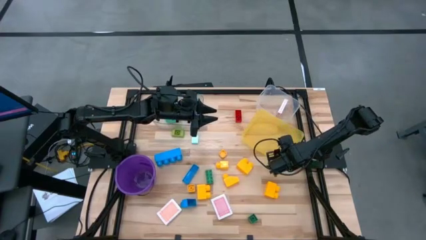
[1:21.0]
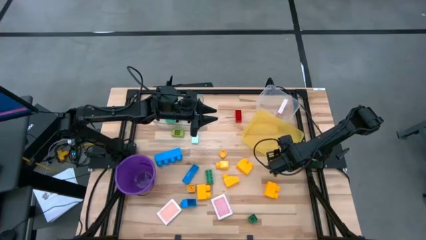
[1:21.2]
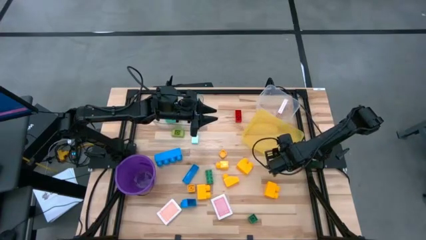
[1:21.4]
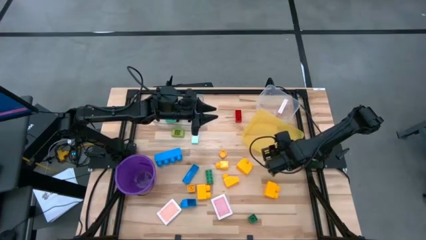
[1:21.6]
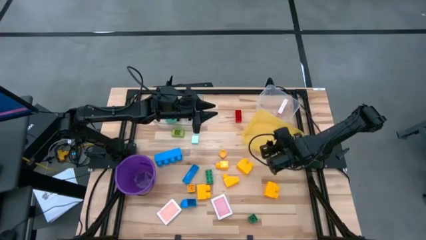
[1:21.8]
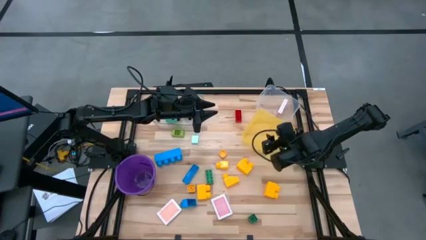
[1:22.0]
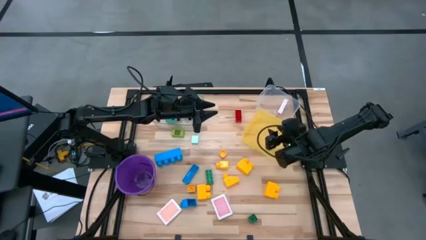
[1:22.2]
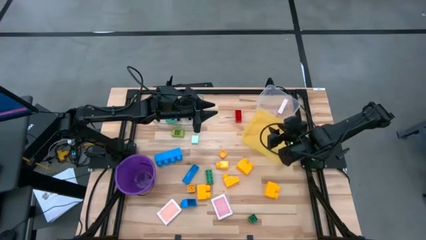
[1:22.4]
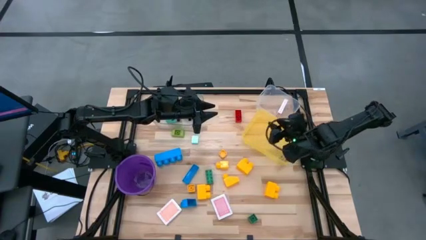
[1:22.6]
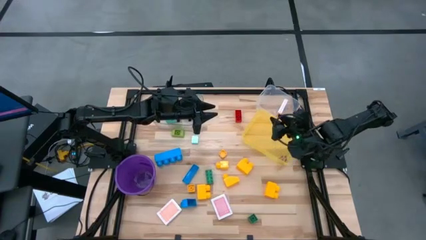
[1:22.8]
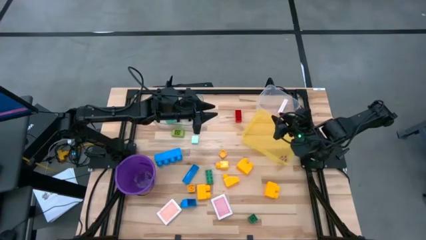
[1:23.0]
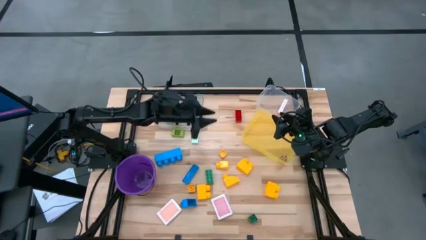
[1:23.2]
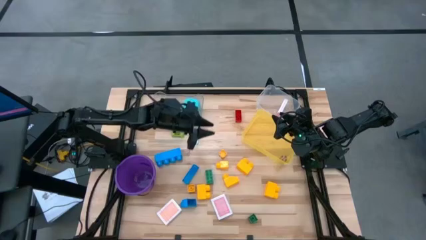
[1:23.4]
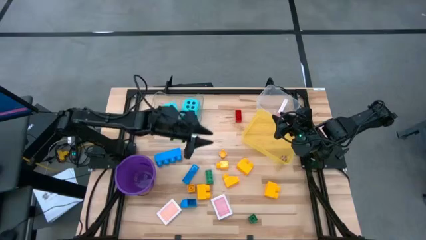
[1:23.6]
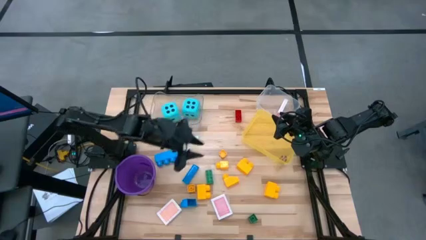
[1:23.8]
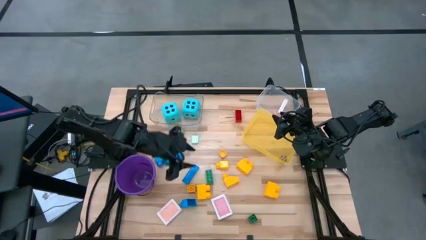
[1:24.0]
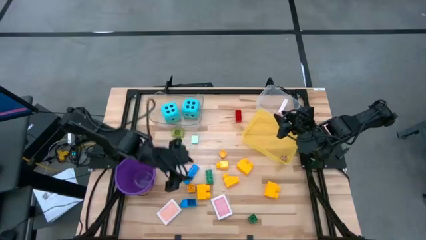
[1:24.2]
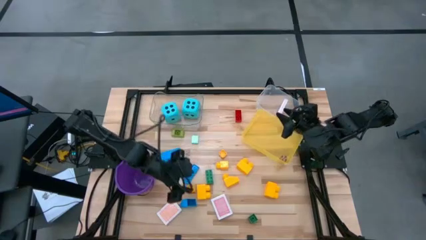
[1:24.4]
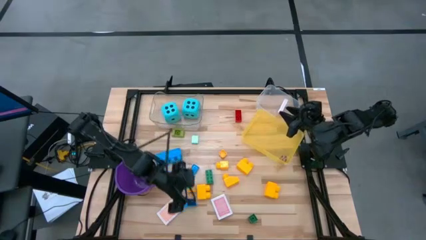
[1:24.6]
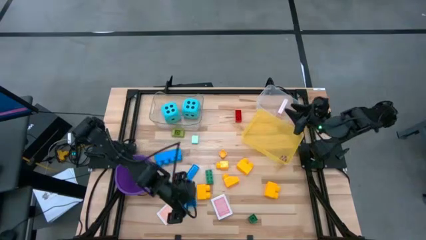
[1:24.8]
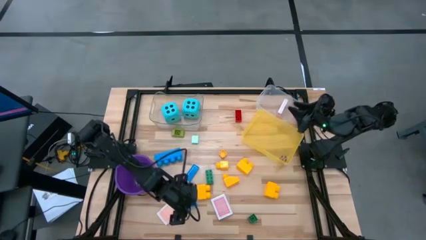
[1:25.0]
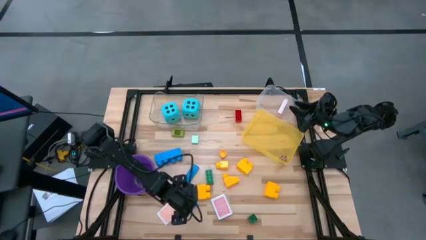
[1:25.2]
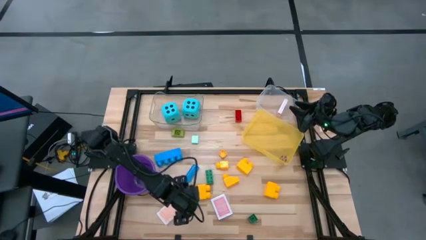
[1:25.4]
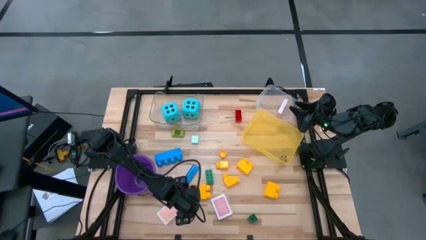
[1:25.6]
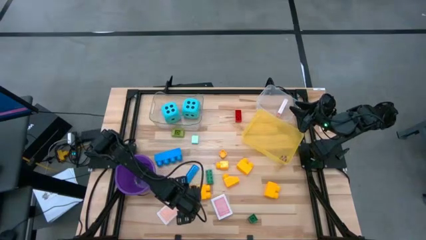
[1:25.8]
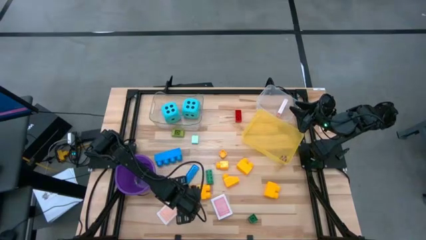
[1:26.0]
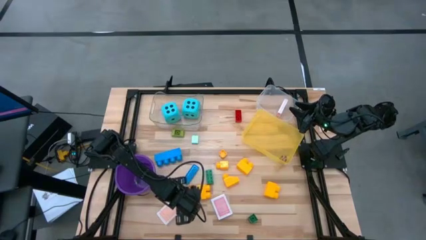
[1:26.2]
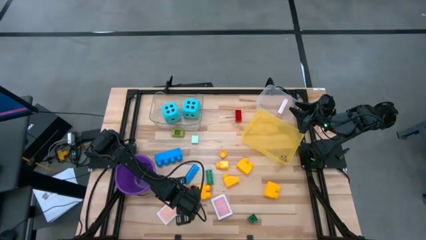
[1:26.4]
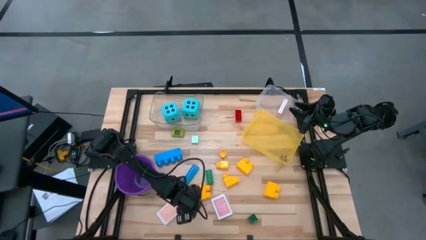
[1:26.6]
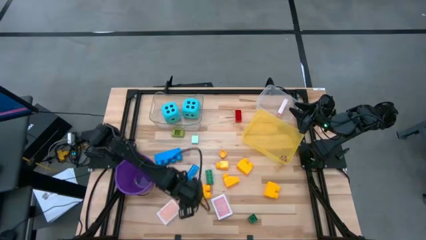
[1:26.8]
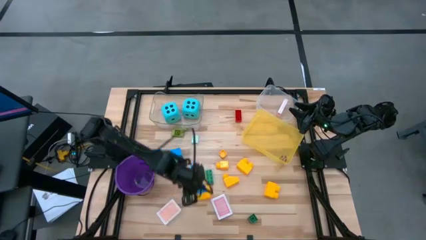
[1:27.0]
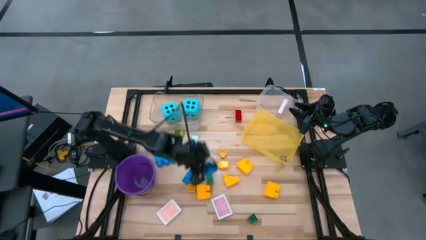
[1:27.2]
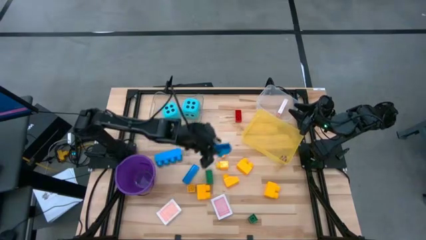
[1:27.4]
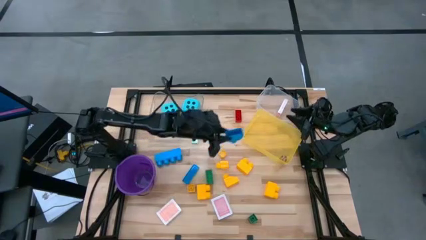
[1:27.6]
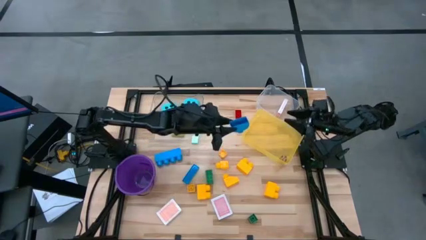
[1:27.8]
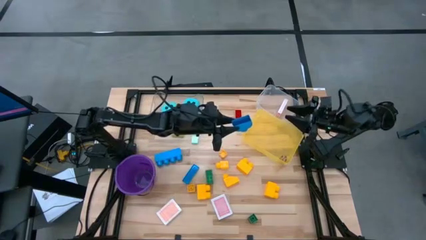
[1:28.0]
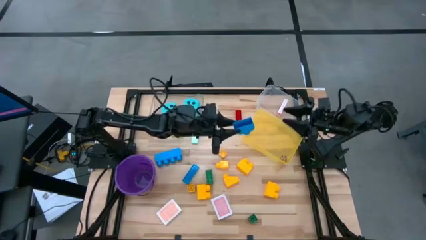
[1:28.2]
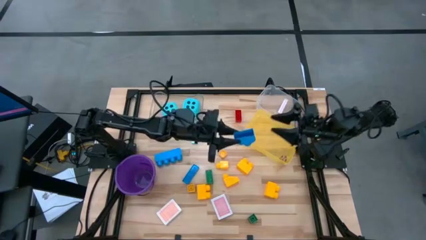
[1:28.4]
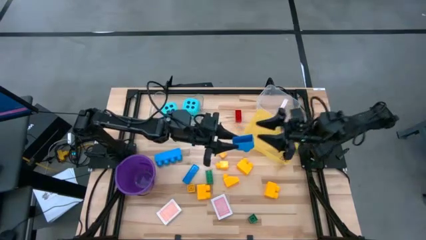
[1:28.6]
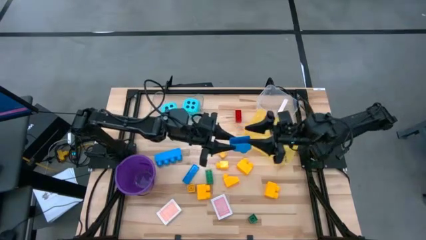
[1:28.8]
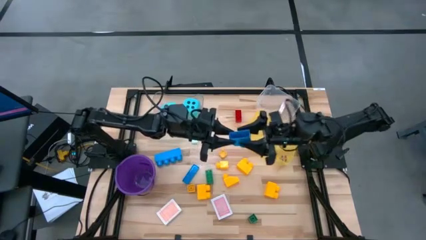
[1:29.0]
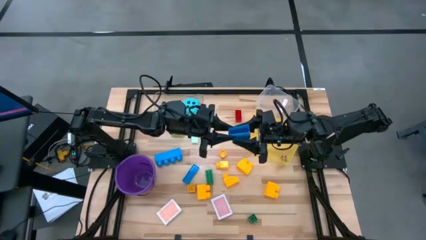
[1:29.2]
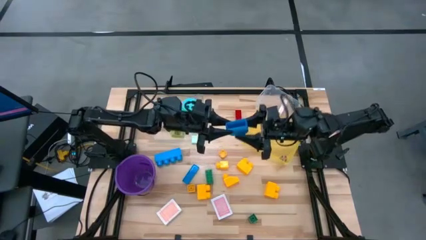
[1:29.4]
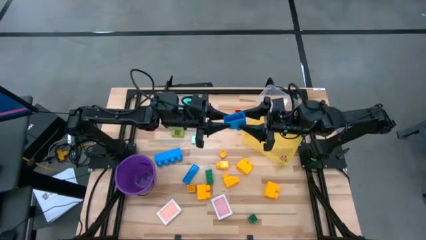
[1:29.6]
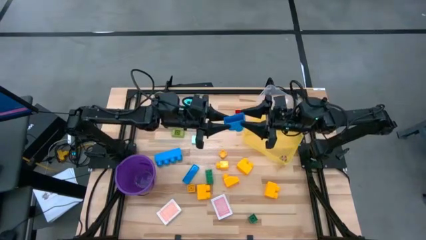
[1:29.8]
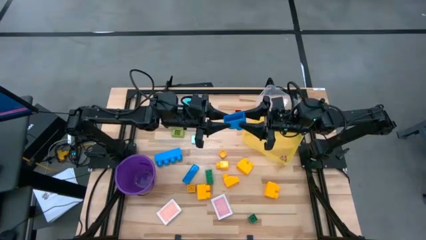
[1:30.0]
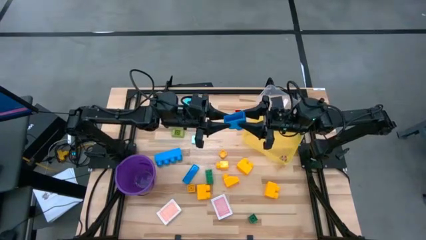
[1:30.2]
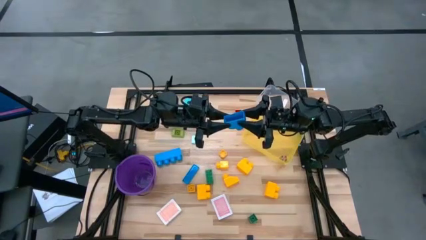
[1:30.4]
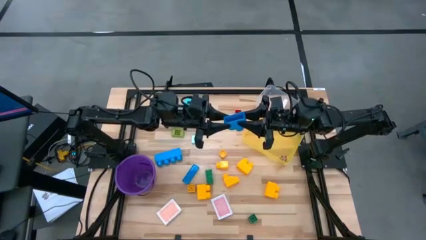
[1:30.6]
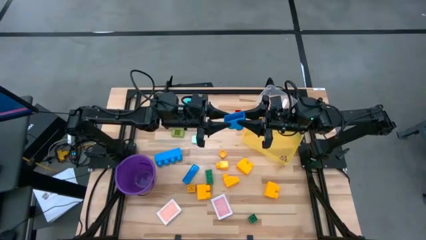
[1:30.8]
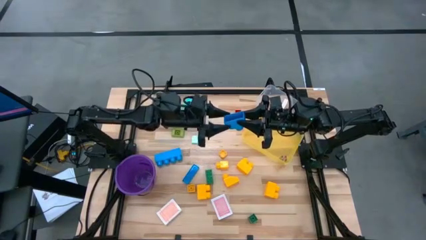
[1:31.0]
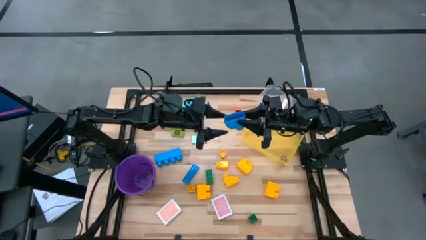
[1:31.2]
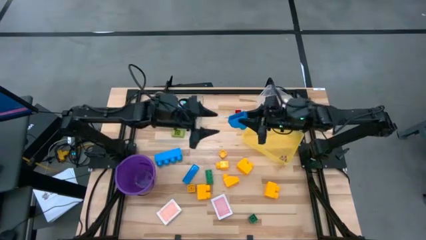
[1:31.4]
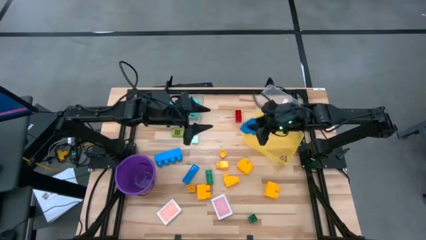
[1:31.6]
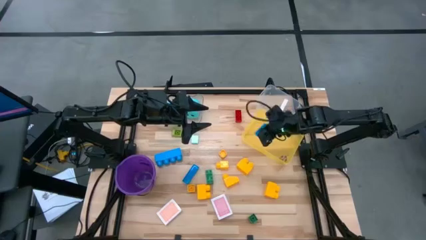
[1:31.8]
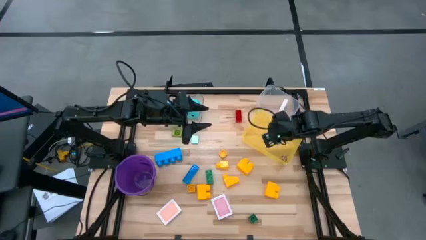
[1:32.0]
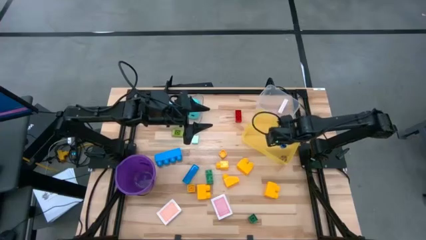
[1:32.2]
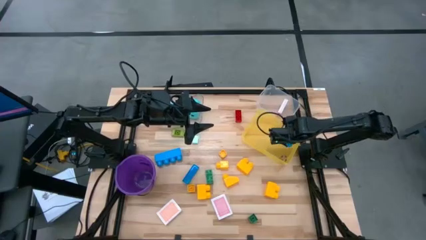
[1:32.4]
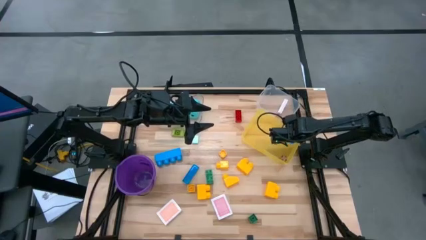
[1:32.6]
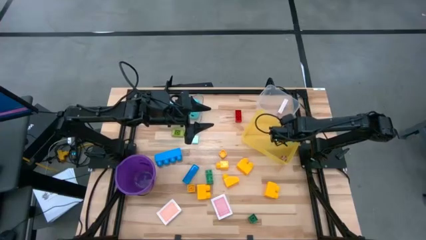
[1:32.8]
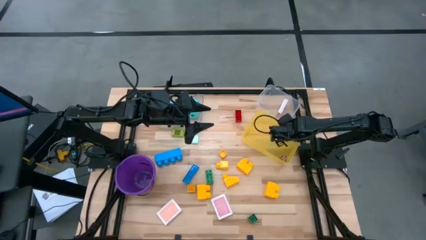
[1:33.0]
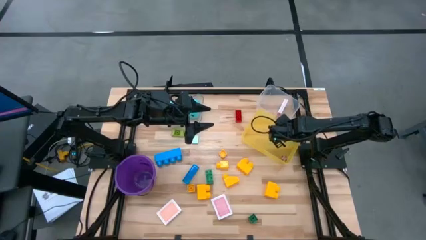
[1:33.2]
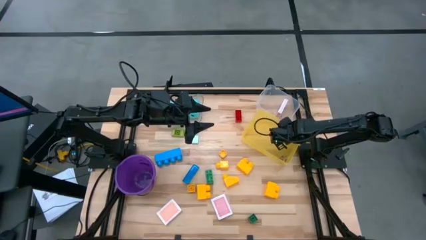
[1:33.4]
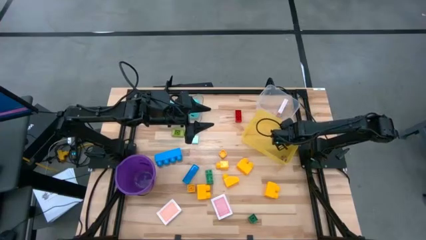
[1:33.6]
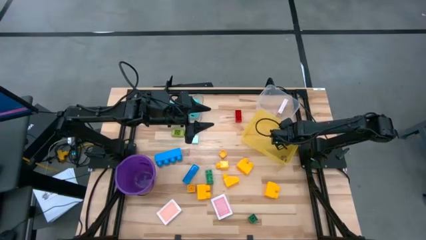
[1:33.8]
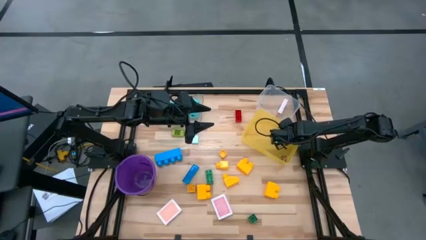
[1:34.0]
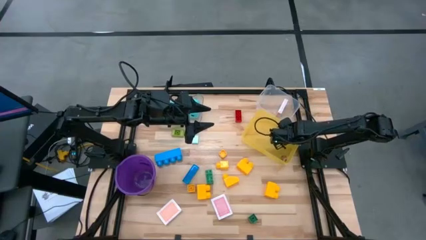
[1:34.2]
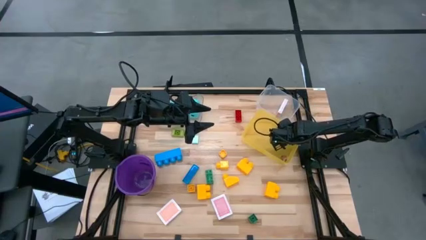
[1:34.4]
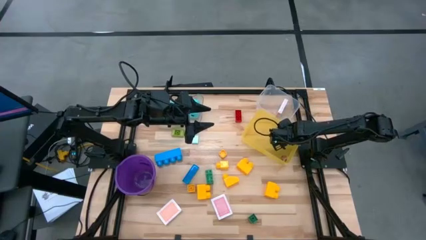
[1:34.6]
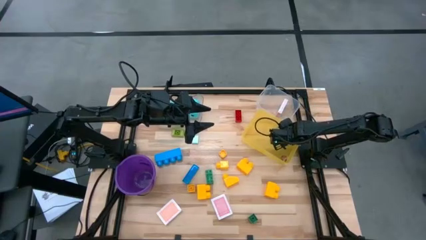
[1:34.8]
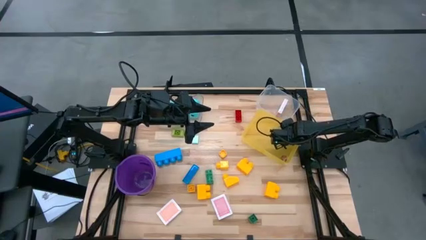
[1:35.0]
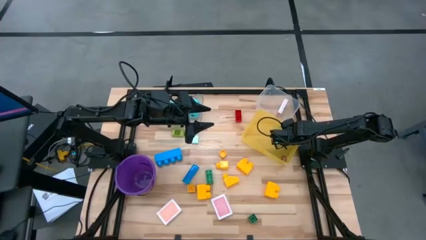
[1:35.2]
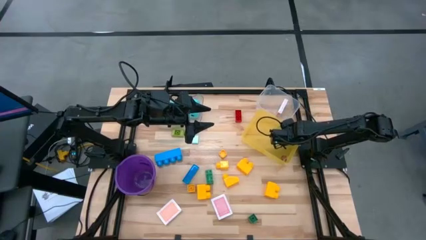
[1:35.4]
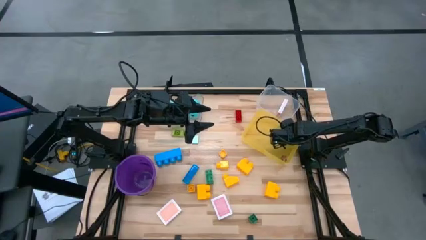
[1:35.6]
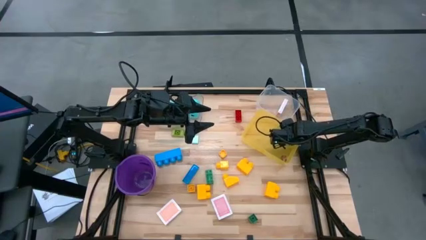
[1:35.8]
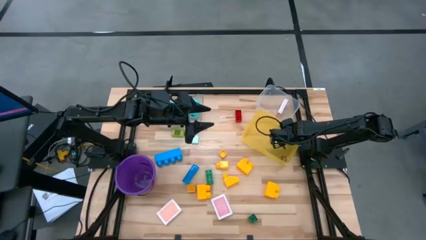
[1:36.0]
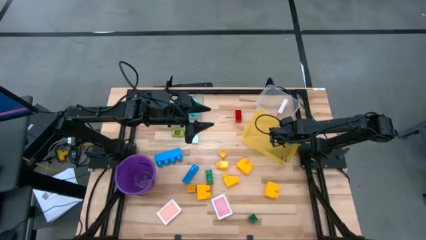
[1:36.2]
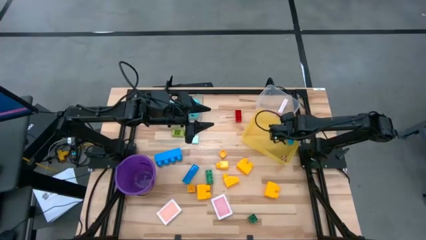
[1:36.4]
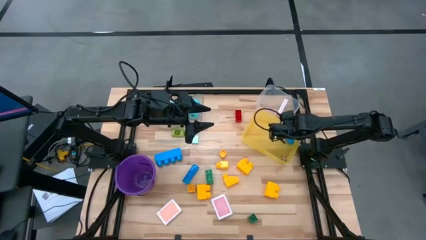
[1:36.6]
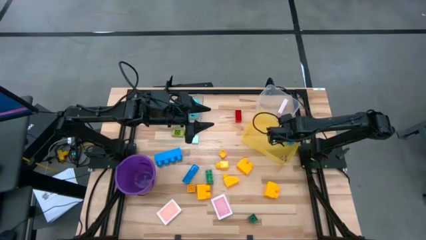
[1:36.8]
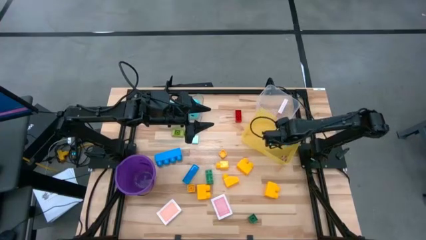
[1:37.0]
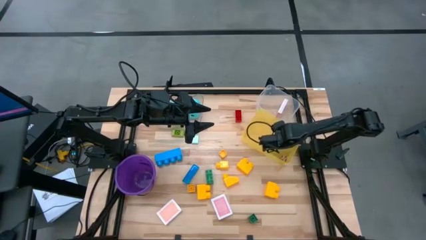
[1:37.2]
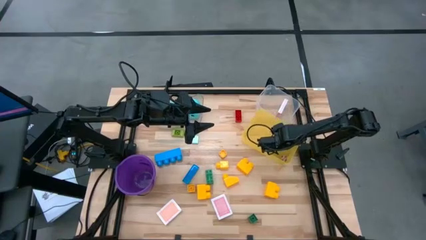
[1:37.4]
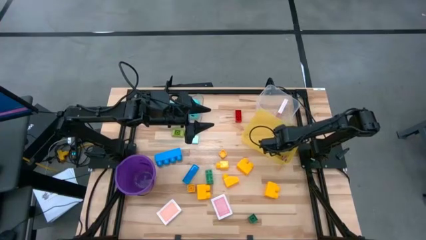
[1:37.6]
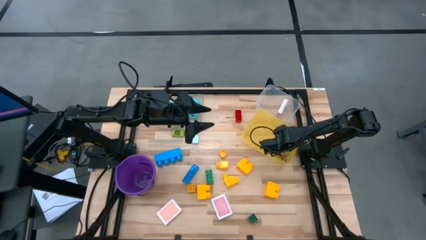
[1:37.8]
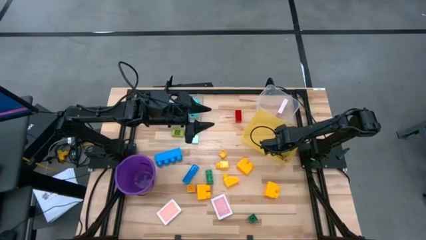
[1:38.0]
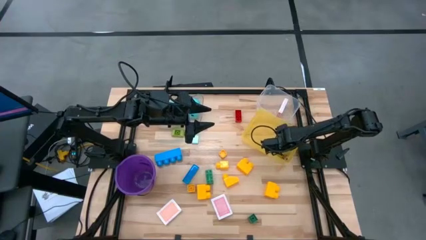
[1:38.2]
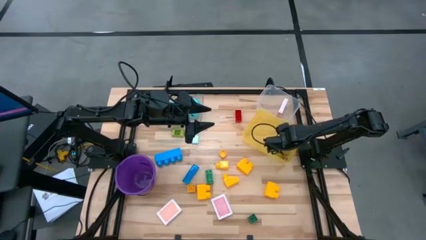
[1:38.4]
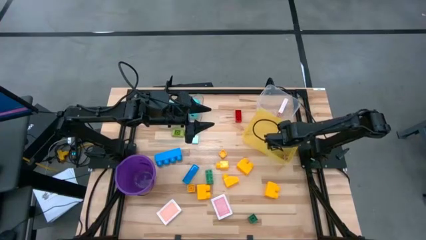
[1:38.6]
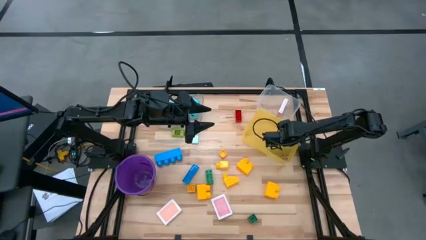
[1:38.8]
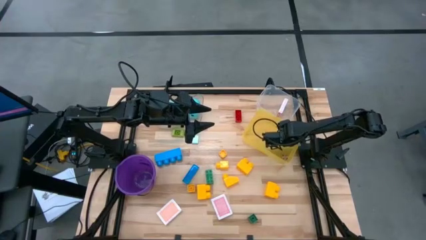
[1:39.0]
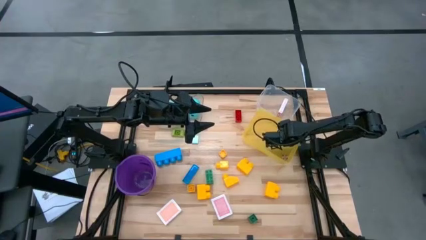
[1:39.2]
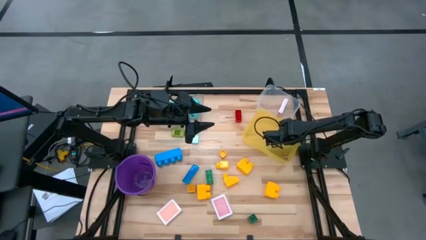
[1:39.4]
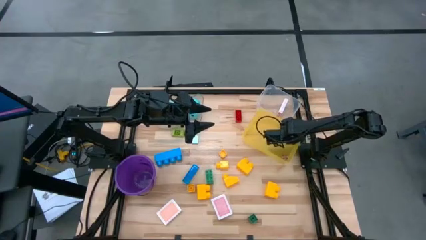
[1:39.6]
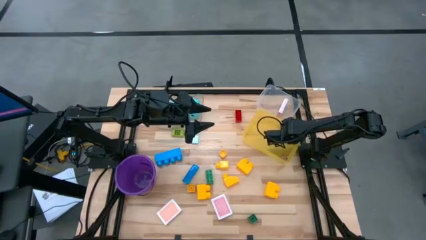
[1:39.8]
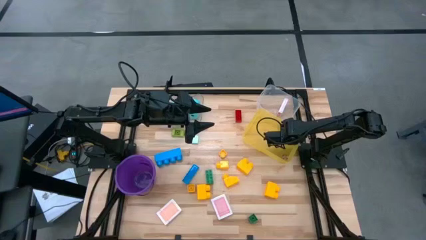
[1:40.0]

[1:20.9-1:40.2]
Task: Pick & Place Toys
Put the blue game piece into the yellow bin
